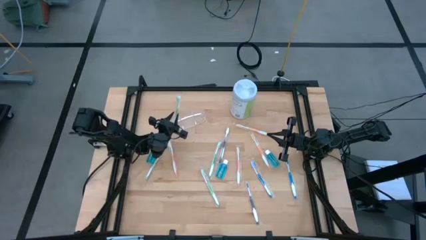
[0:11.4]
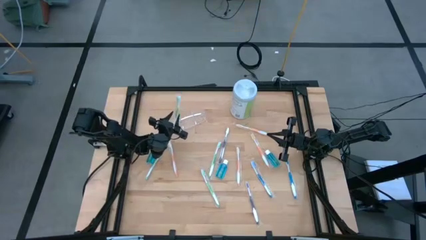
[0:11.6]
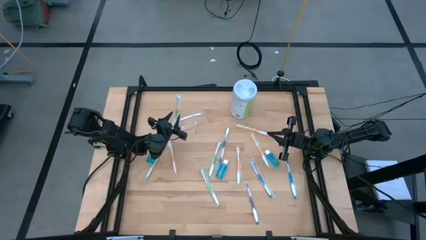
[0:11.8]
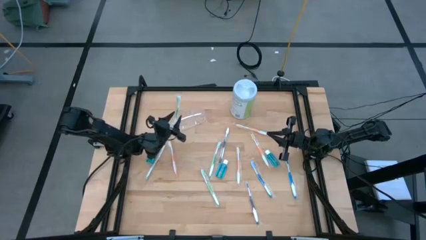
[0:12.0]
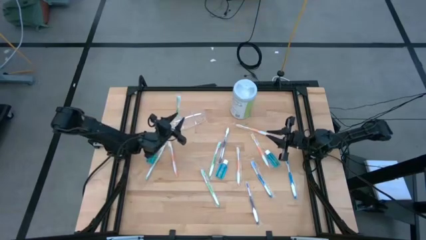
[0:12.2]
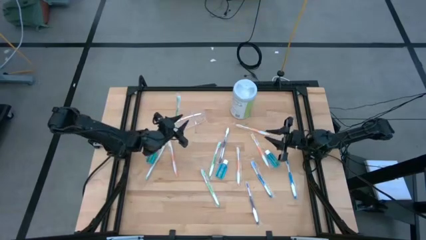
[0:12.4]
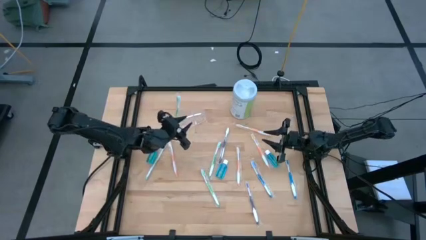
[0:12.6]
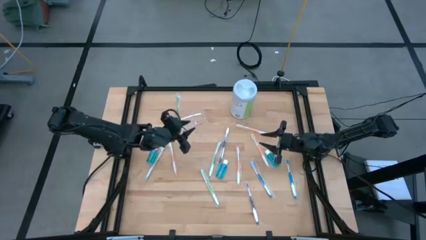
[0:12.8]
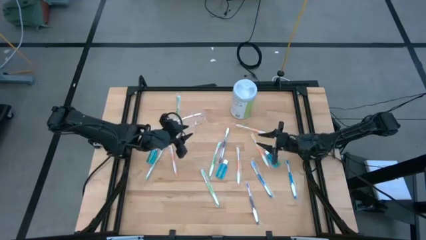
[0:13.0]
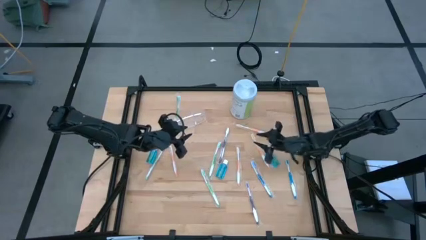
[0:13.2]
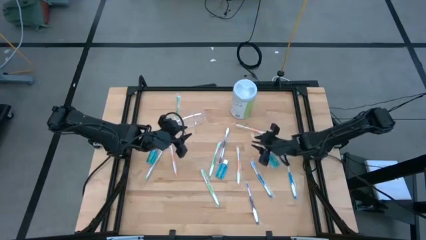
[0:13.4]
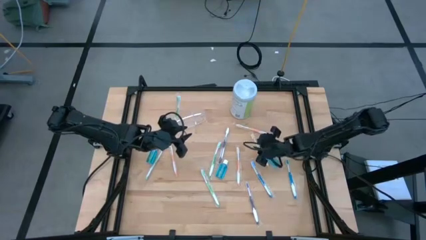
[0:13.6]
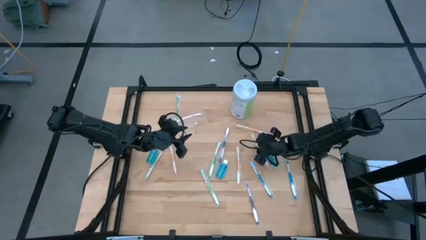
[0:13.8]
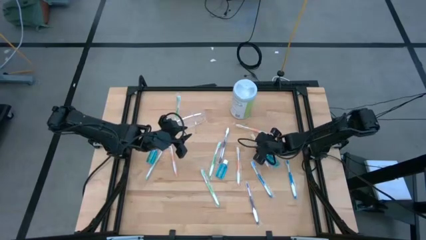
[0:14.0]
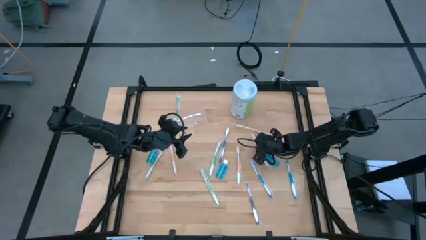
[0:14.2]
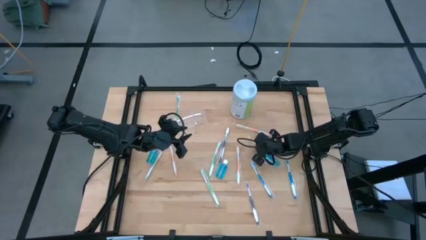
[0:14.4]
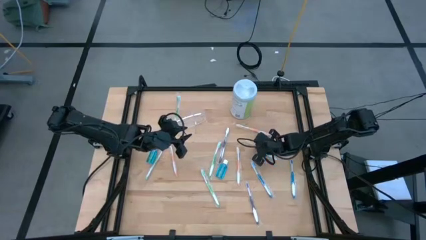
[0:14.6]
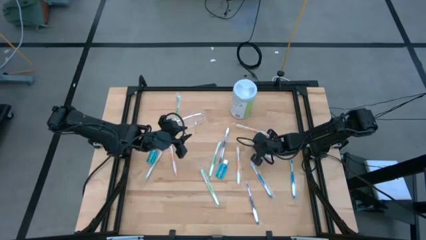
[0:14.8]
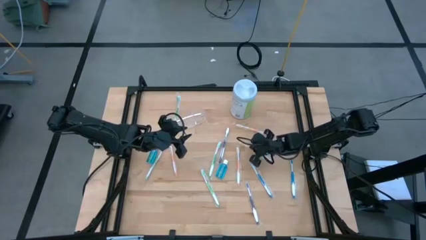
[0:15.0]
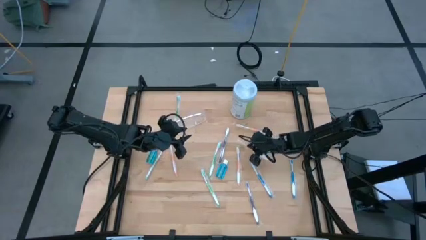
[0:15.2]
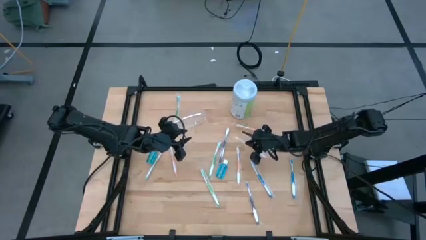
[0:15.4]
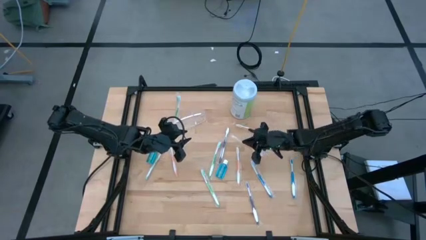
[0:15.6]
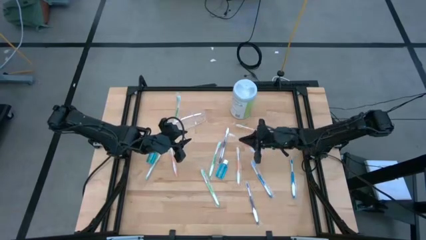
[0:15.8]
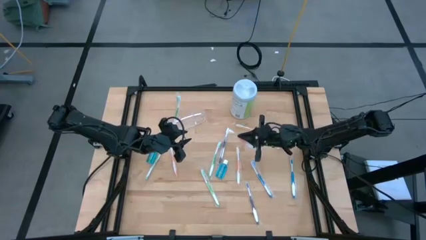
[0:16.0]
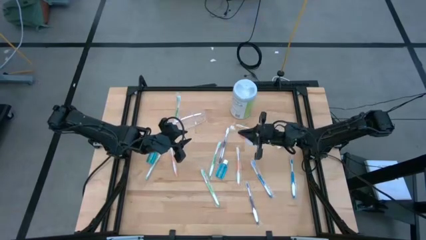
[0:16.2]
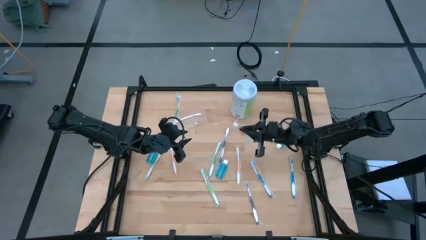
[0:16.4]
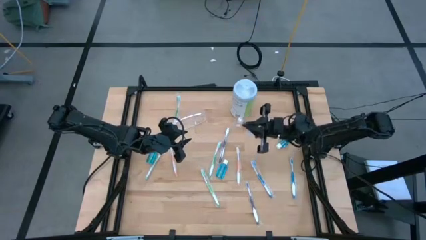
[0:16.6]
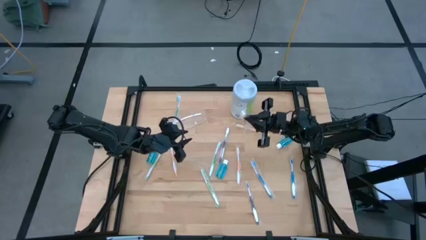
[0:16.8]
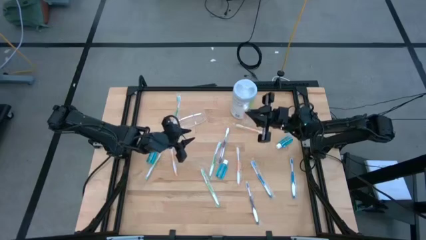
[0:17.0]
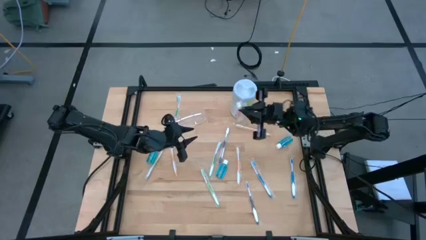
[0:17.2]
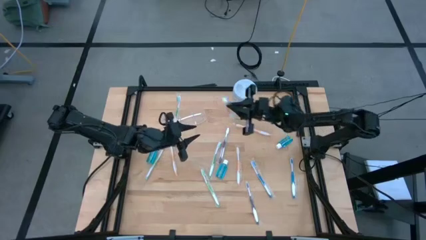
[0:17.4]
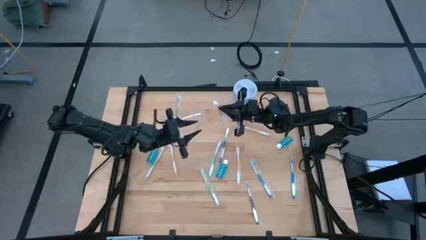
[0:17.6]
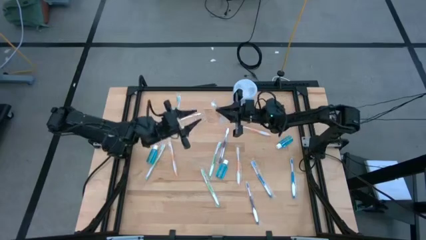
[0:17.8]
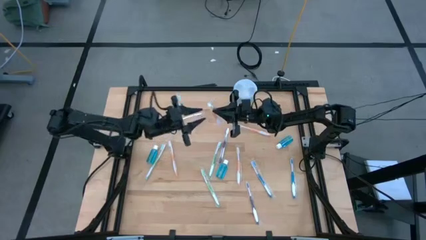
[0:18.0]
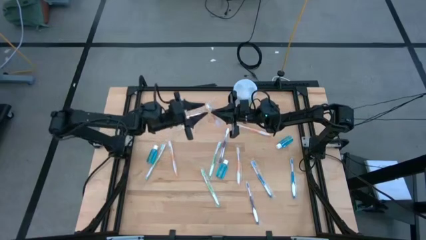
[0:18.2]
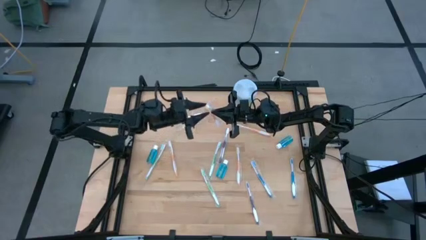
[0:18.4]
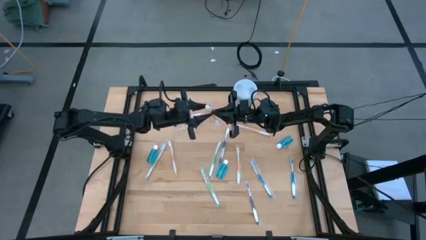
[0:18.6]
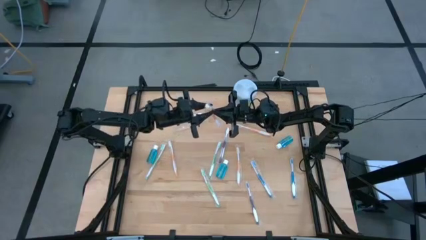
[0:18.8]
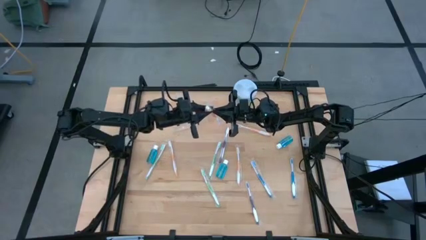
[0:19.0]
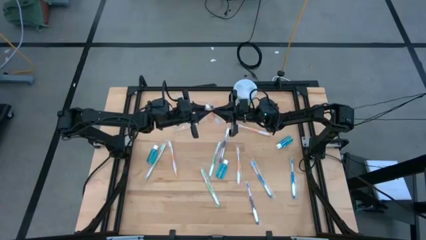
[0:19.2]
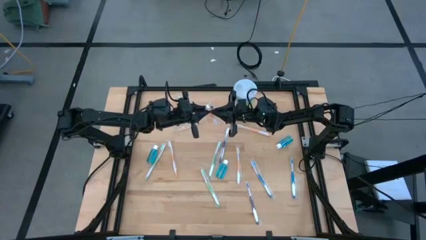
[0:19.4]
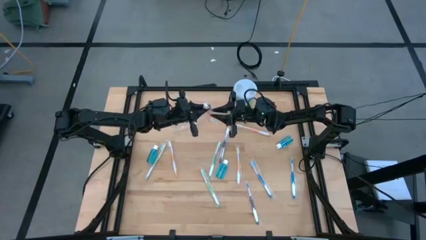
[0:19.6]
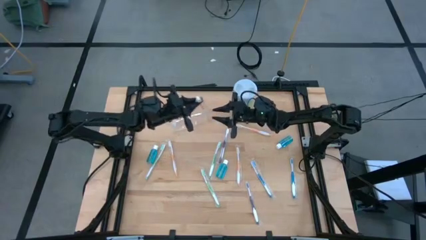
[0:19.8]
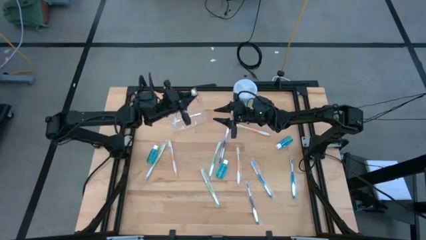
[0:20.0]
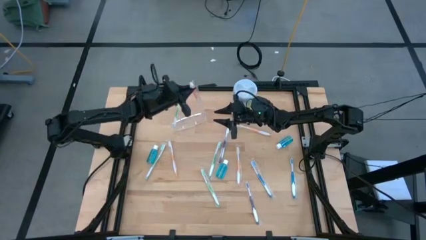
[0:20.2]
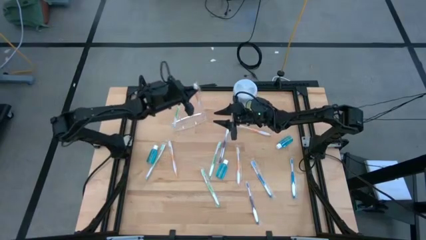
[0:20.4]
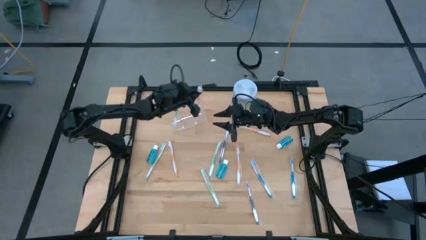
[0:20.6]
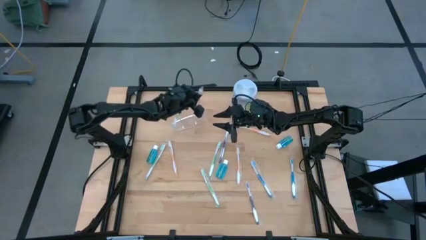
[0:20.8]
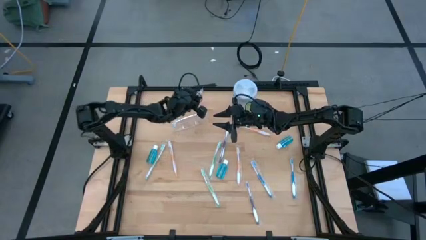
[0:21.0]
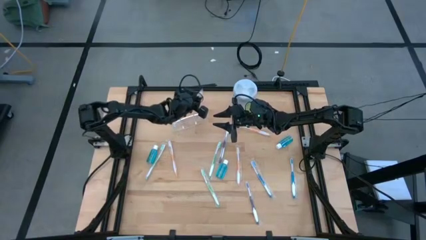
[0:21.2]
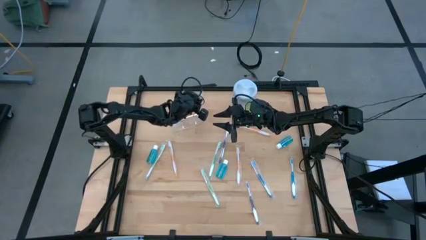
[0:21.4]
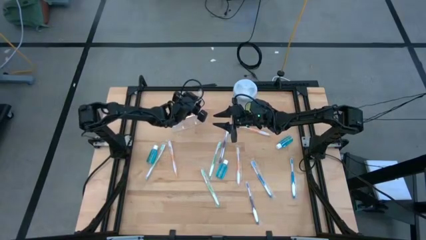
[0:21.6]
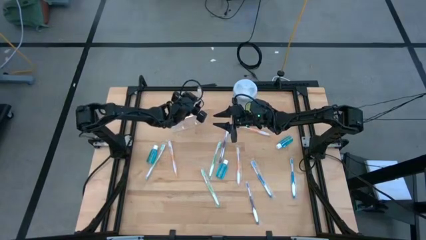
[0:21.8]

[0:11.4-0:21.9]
Task: Pick & Place toothbrushing station
Put the orange toothbrush into the transparent organizer

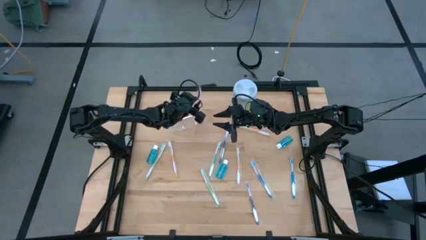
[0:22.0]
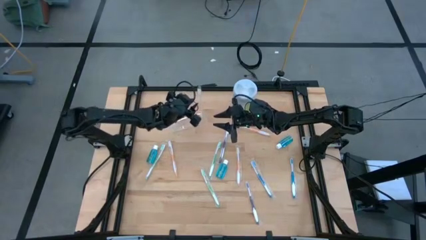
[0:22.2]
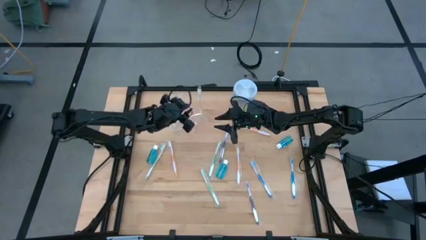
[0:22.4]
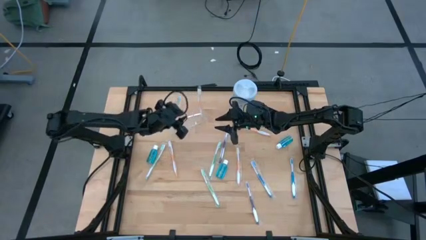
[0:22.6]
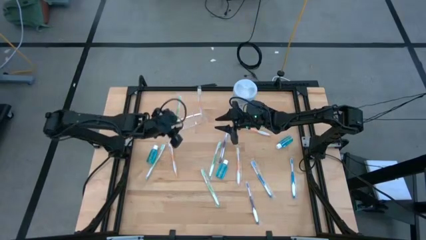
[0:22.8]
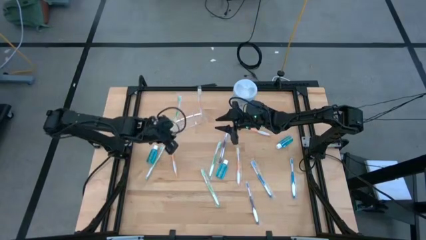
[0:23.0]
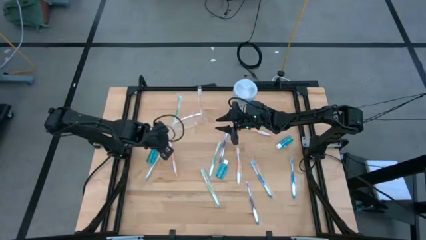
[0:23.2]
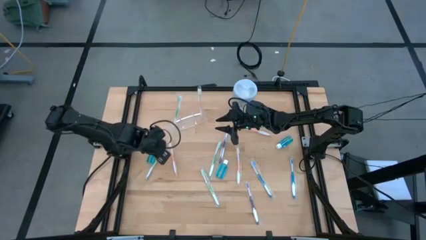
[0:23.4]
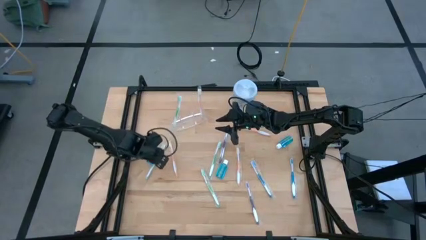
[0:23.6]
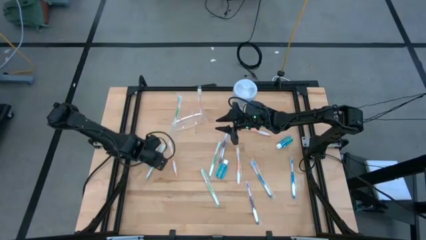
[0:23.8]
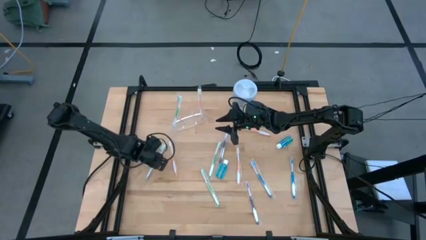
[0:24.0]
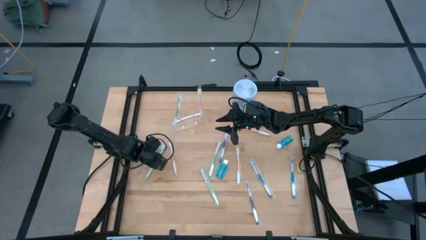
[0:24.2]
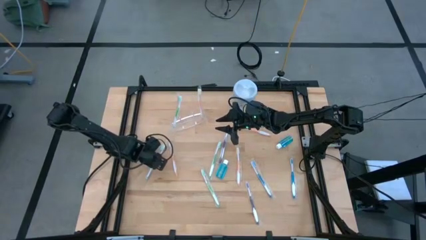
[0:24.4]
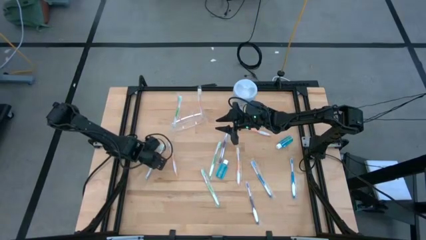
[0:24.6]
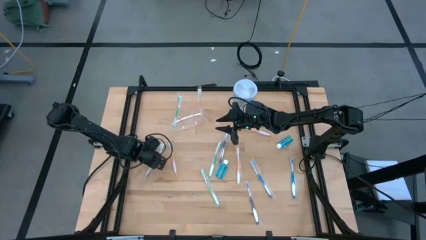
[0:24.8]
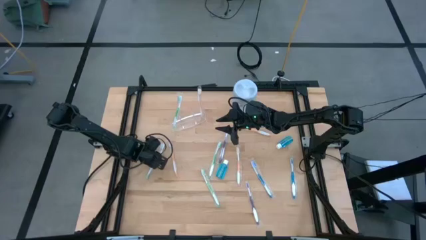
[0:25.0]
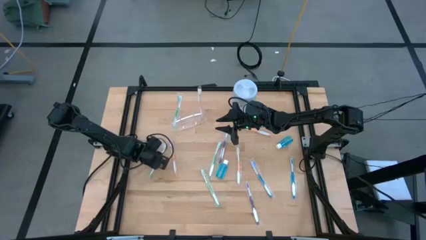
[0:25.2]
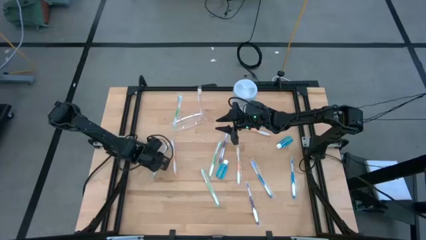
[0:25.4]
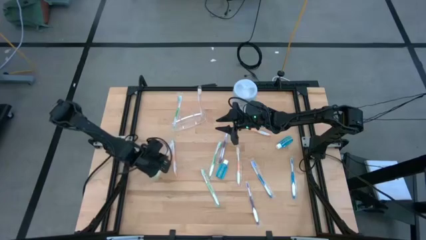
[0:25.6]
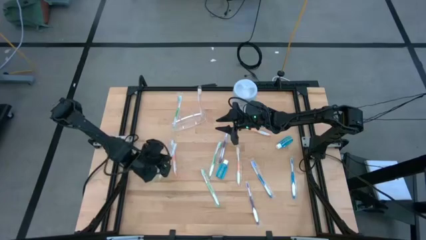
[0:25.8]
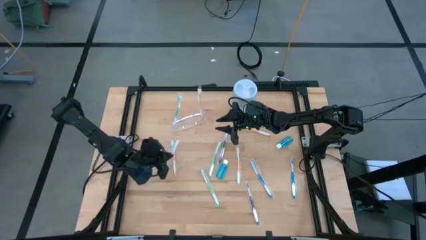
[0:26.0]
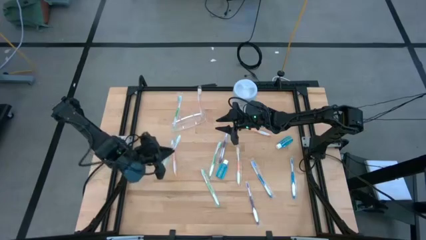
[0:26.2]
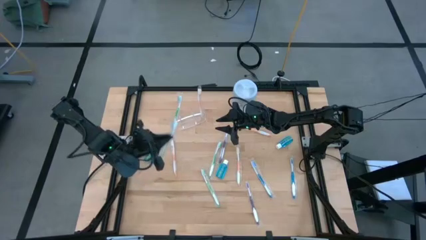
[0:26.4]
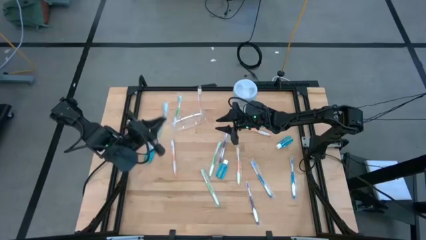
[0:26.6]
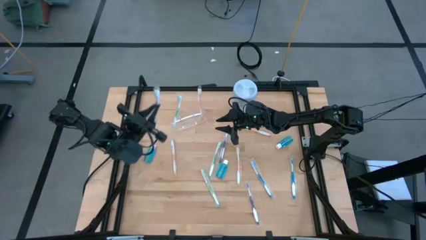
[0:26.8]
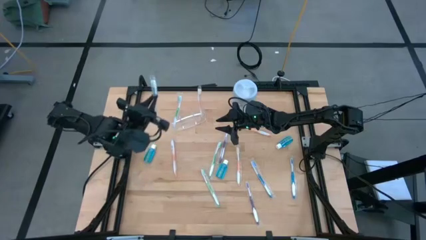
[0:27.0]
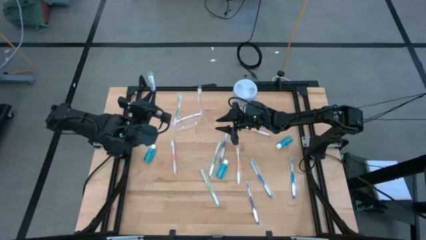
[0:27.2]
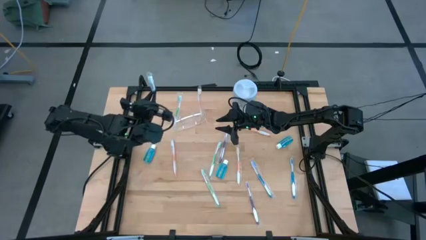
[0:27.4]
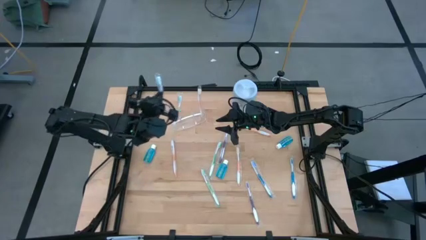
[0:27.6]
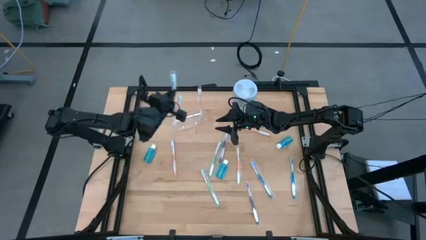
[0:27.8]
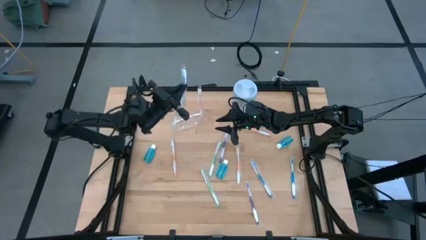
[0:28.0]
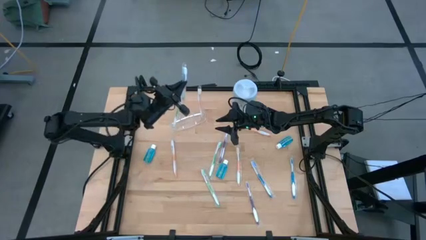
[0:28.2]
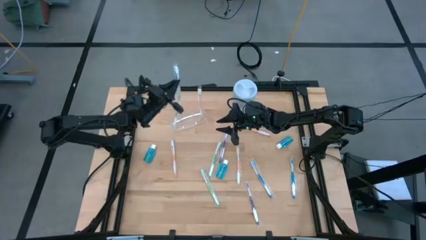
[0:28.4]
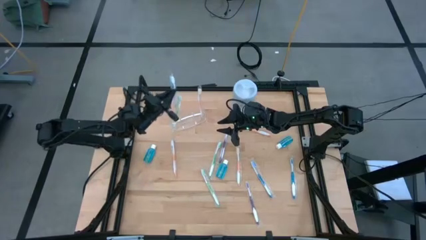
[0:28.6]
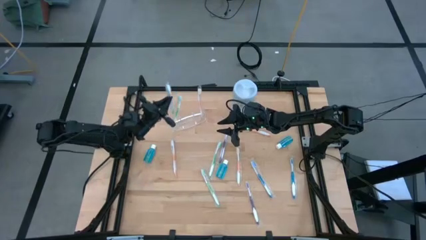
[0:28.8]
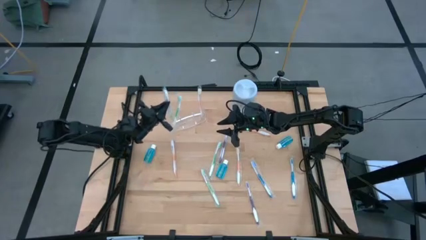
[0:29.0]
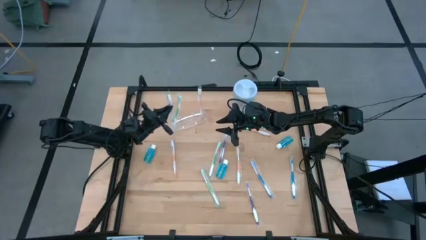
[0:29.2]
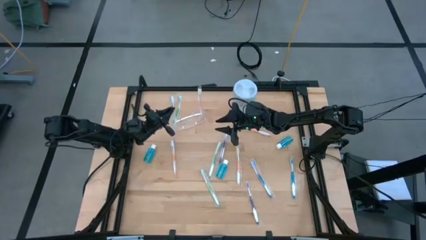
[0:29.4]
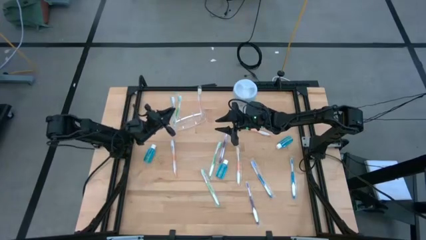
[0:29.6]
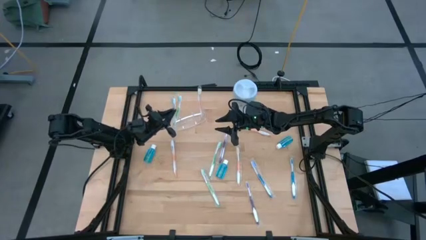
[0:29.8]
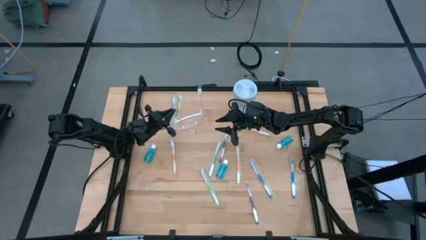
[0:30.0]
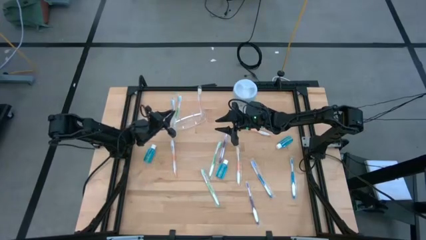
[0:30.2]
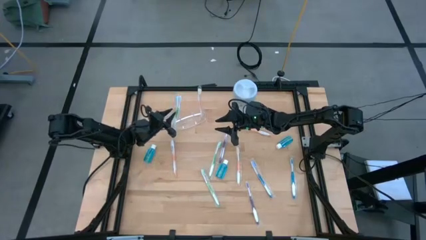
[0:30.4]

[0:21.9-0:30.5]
Put the green toothbrush into the transparent organizer
